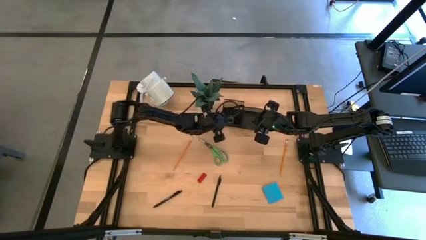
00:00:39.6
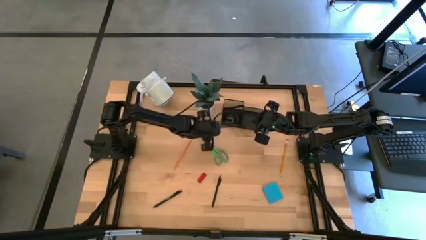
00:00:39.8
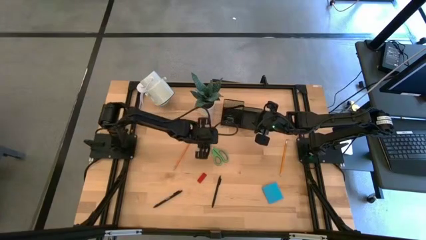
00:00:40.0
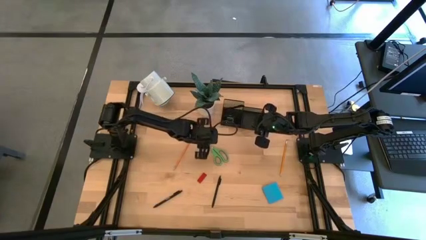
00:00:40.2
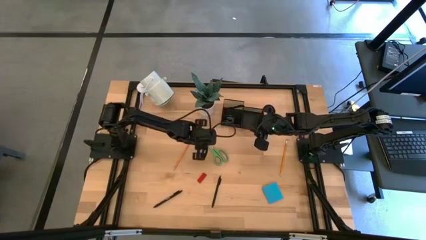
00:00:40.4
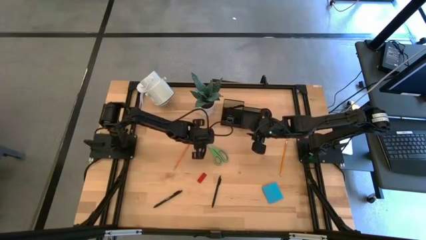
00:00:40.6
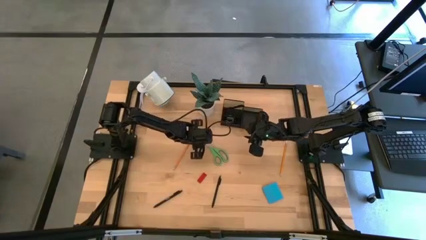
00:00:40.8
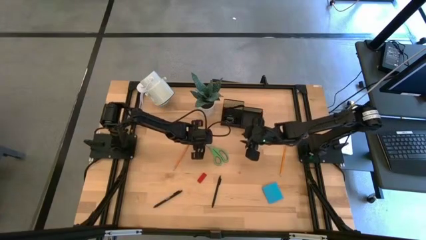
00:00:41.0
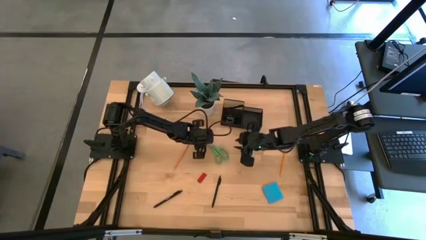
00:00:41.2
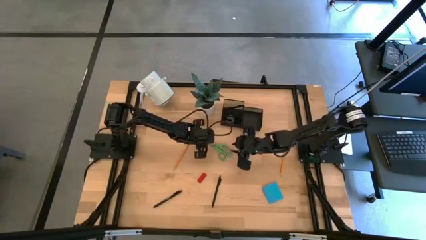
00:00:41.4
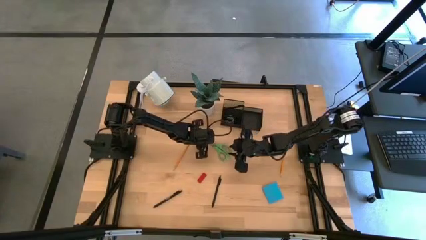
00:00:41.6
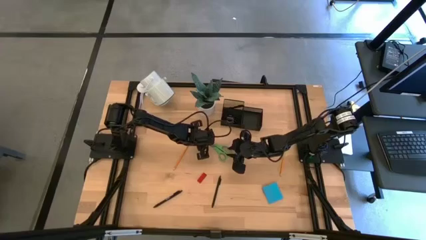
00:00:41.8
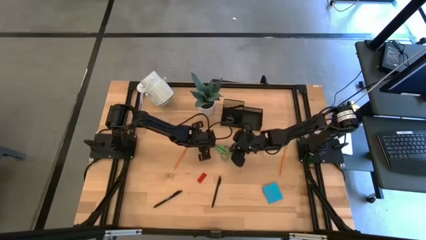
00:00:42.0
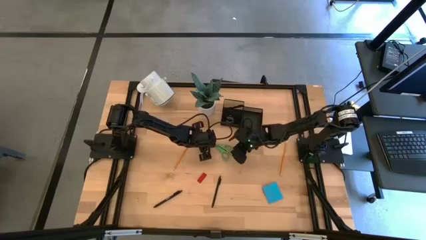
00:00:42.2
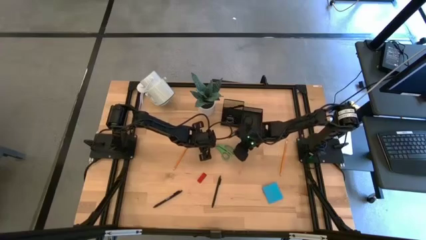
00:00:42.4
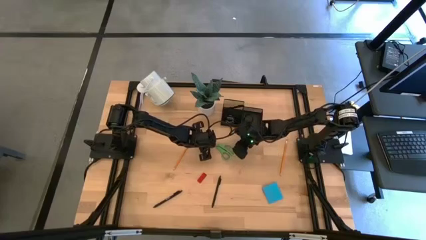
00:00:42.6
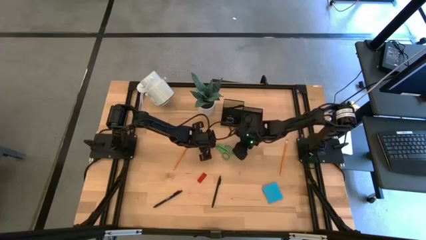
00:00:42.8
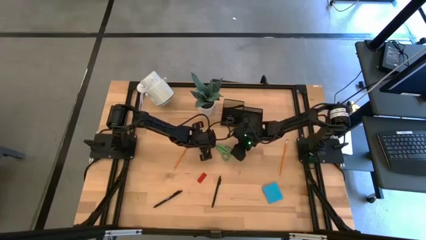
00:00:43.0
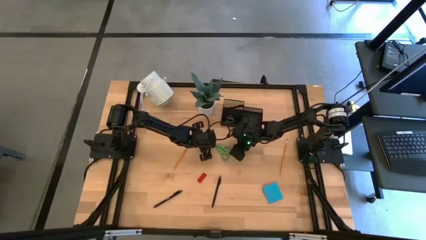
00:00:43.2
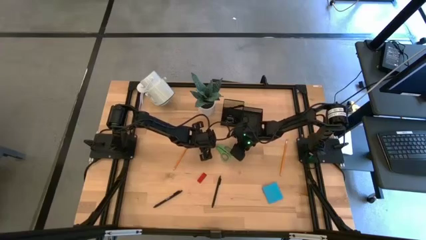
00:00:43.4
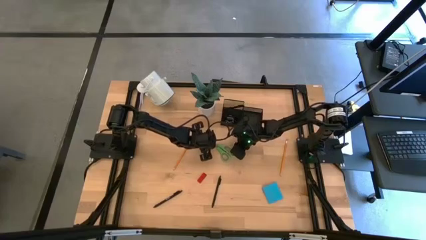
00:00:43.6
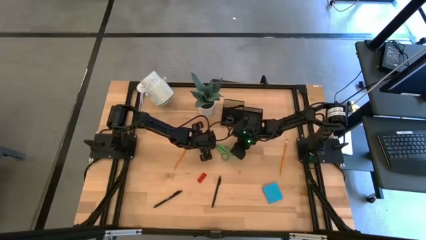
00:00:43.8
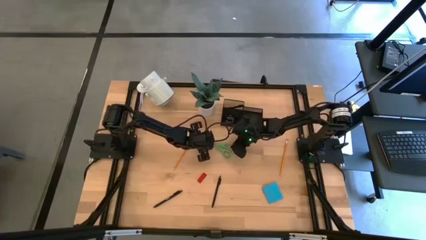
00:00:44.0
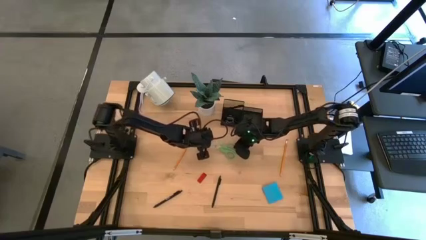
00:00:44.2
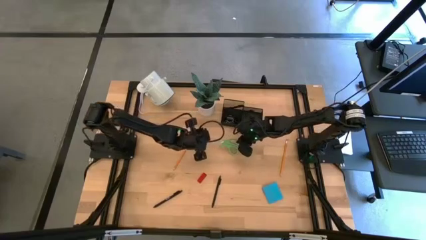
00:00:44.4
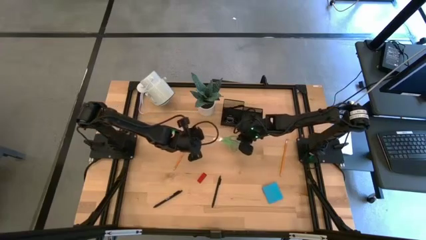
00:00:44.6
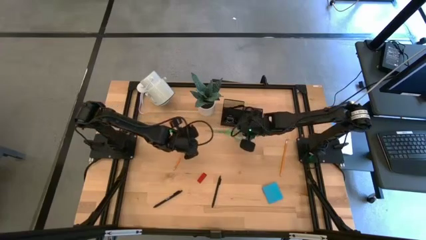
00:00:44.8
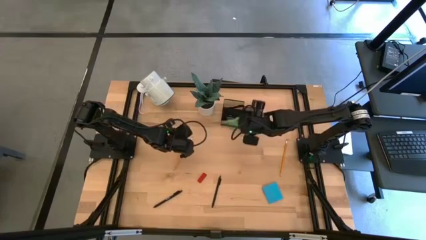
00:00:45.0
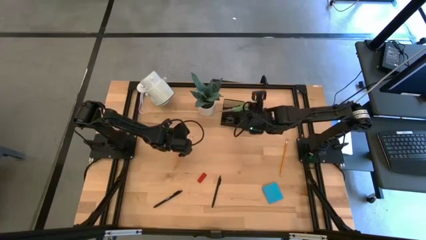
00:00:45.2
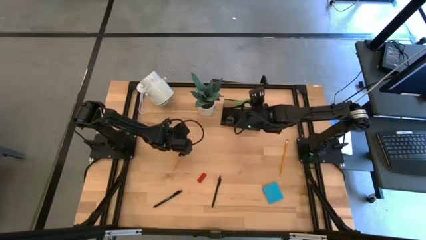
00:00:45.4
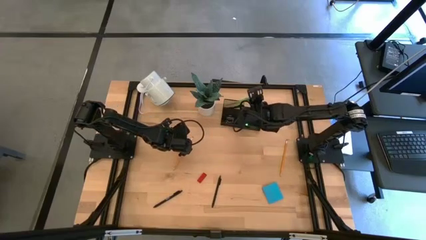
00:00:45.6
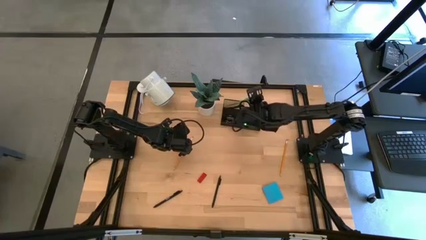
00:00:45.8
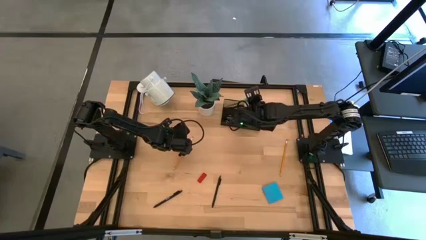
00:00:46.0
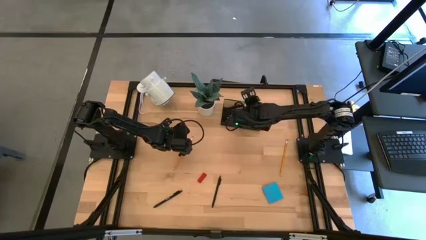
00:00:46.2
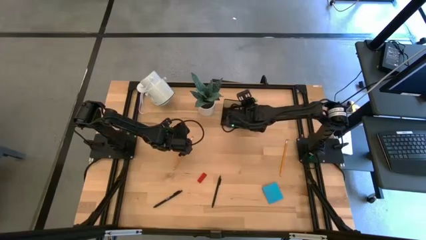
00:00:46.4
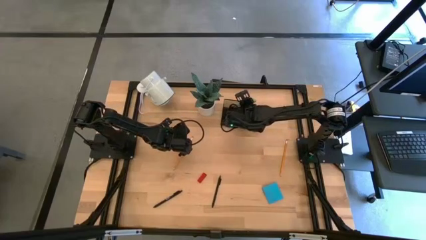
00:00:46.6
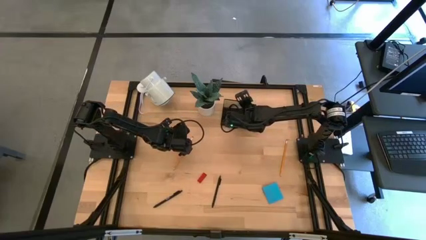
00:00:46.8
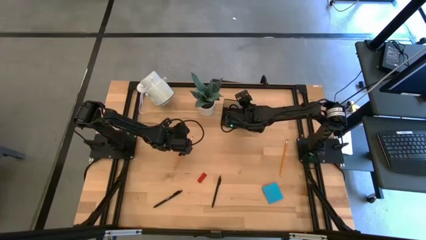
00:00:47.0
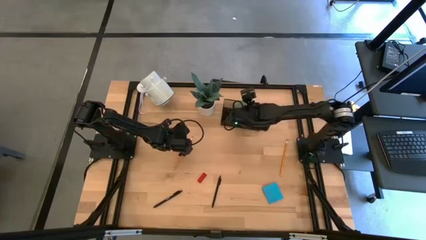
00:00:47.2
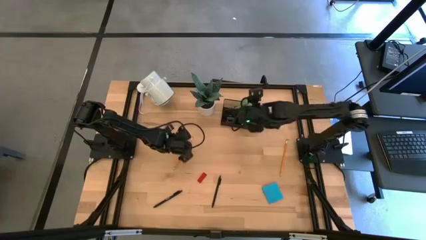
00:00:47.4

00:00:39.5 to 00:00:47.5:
Task: Pick and place office supplies into organizer
Put the green scissors into the desk organizer

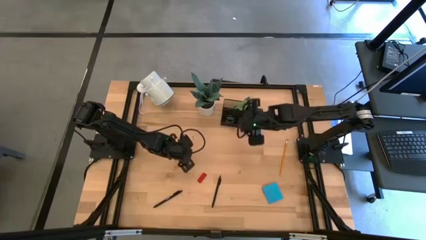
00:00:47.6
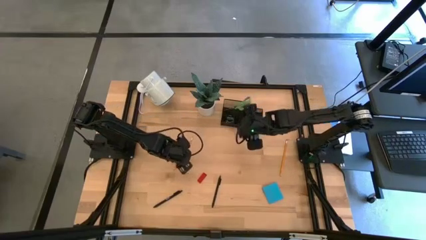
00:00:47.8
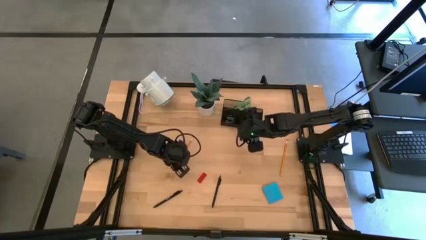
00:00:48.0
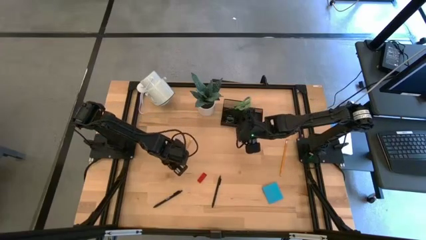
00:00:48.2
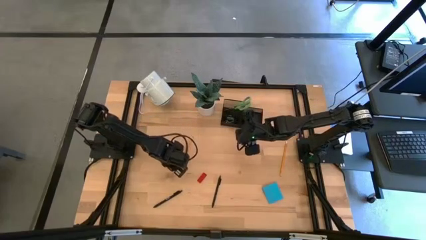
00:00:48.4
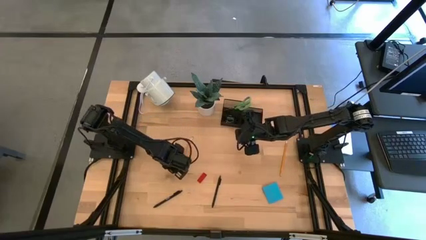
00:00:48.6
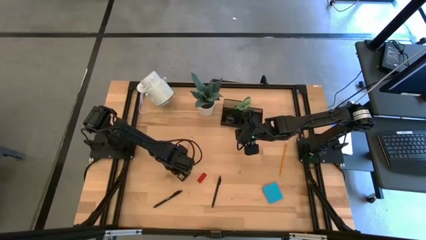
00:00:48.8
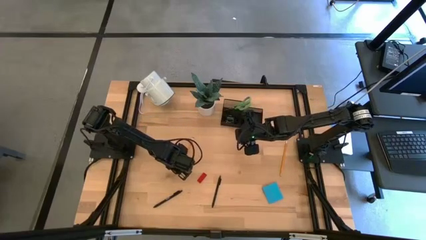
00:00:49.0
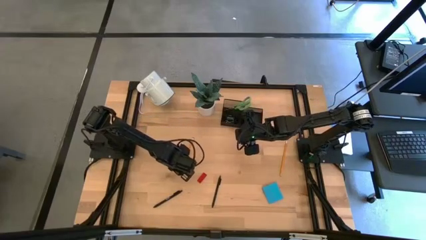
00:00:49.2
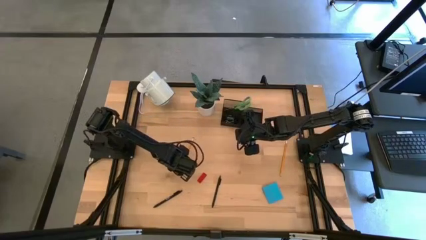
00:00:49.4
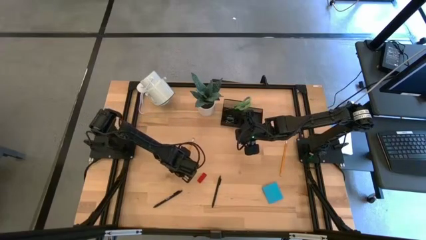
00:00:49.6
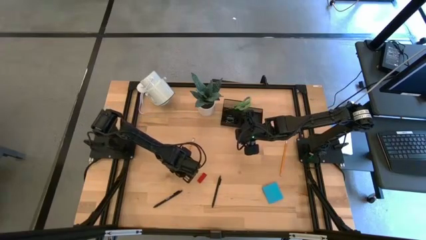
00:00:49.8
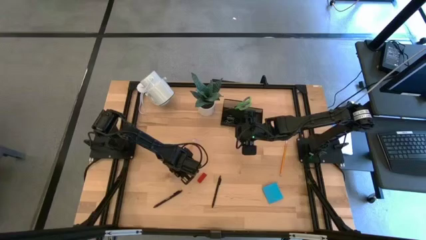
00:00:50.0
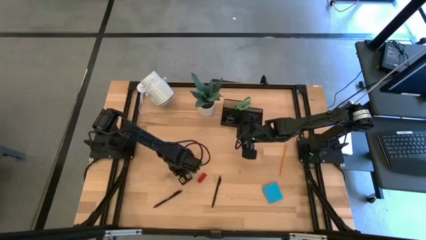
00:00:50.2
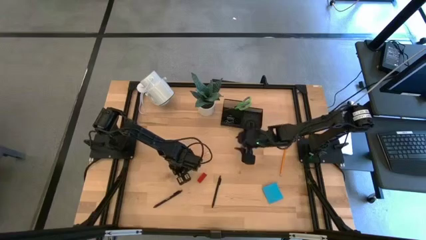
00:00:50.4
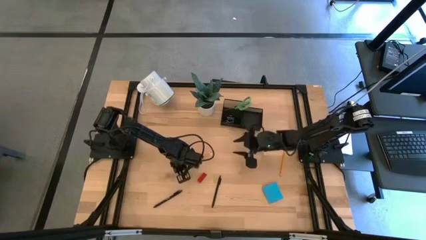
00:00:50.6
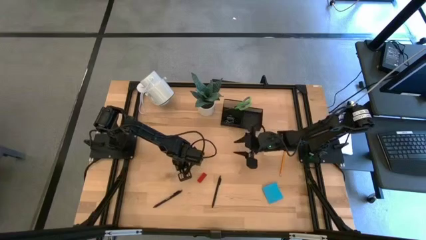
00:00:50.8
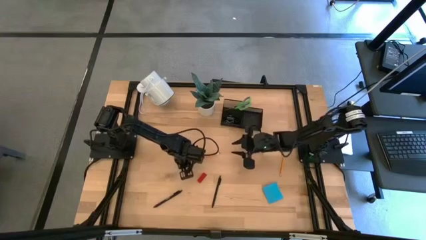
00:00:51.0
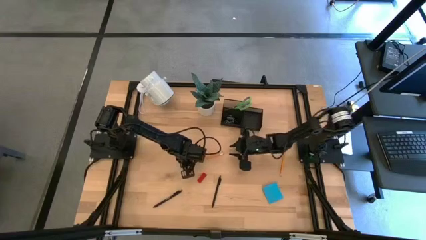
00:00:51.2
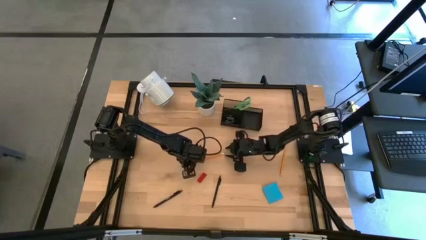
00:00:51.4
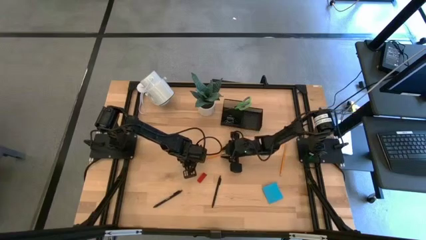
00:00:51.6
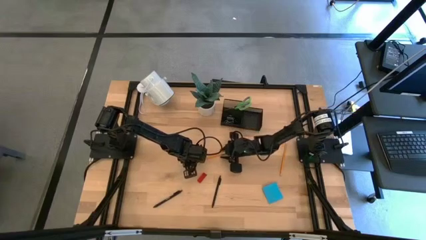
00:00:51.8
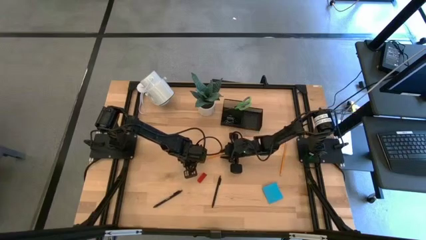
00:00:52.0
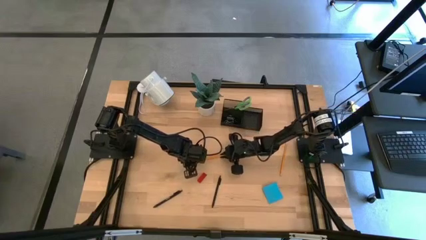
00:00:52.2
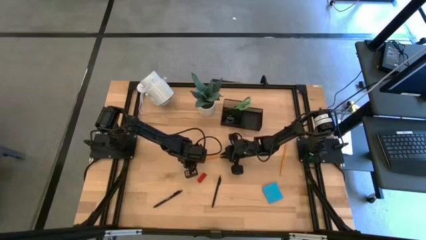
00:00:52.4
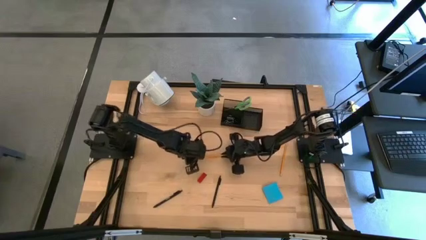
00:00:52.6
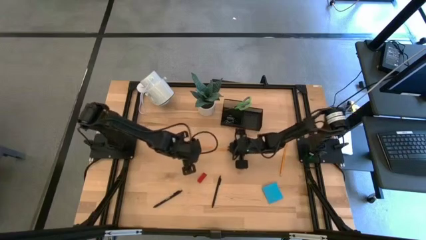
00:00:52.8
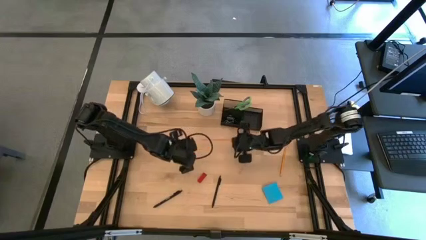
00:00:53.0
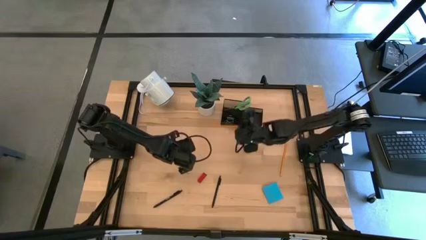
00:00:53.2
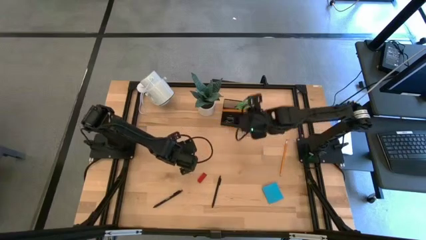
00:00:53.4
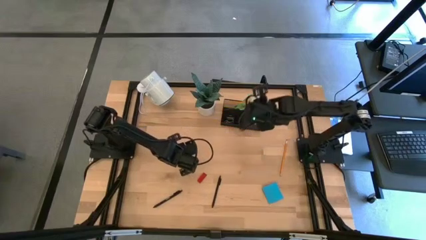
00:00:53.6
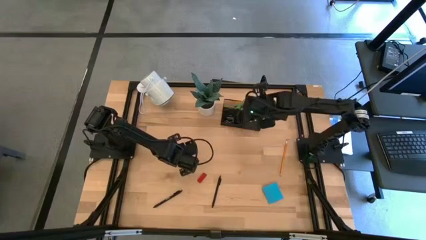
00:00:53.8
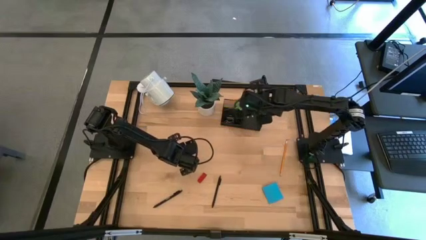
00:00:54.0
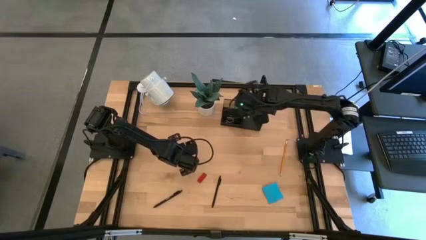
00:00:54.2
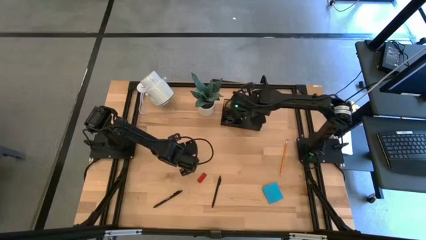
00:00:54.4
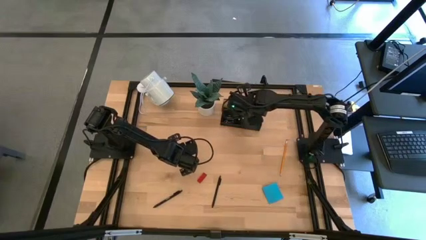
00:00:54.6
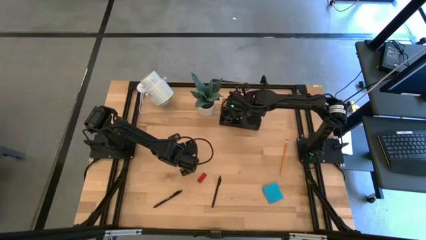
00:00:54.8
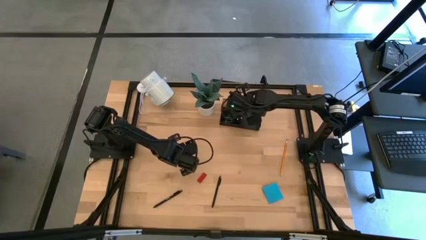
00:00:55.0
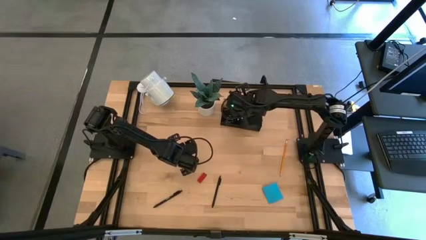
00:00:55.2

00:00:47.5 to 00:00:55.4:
Put the left orange pencil into the desk organizer
